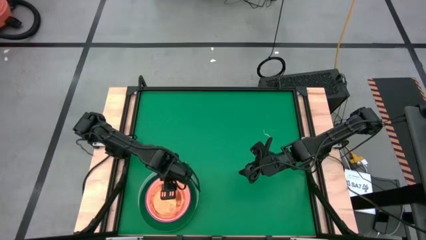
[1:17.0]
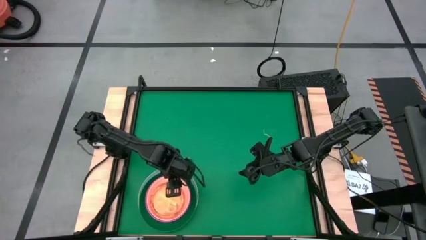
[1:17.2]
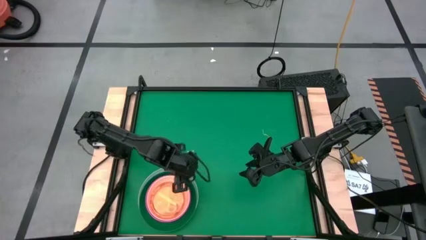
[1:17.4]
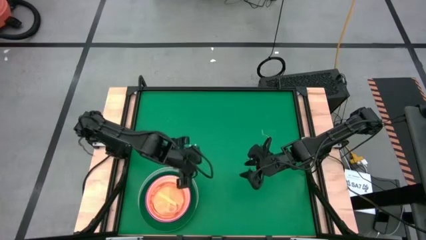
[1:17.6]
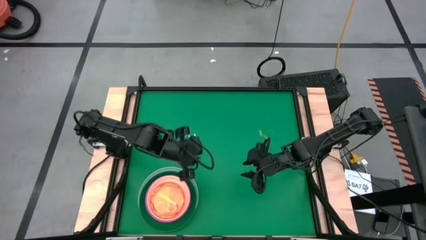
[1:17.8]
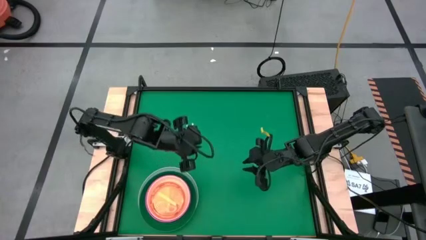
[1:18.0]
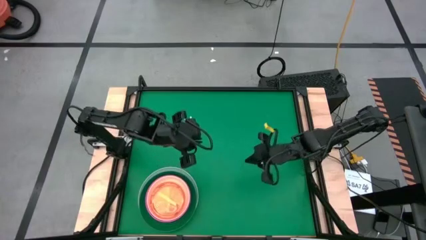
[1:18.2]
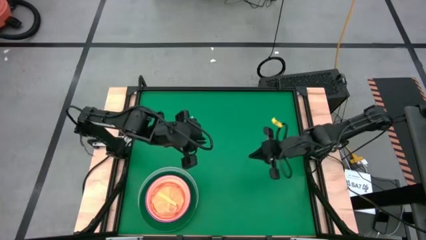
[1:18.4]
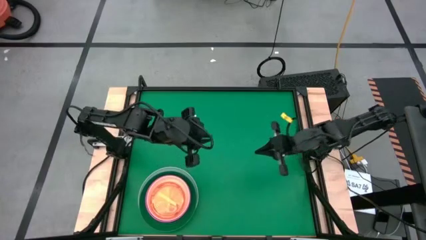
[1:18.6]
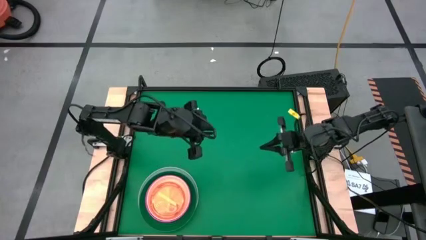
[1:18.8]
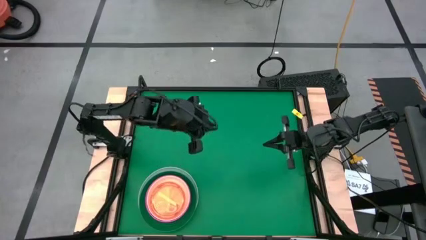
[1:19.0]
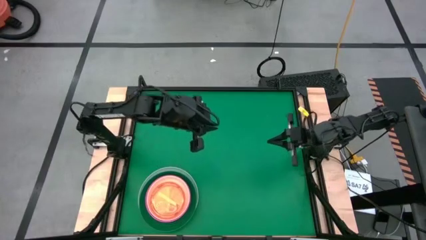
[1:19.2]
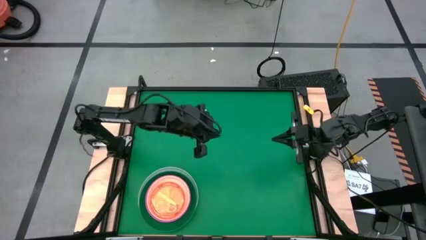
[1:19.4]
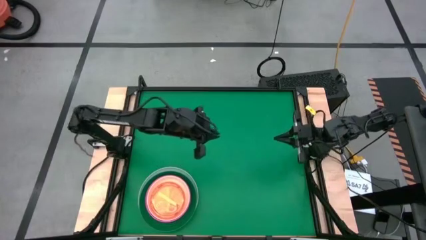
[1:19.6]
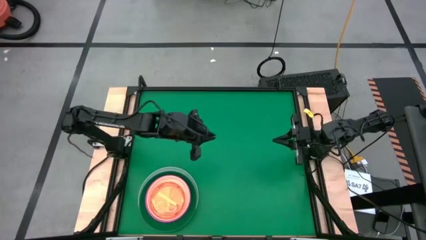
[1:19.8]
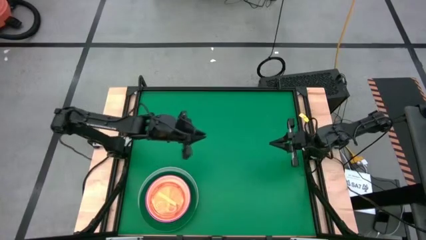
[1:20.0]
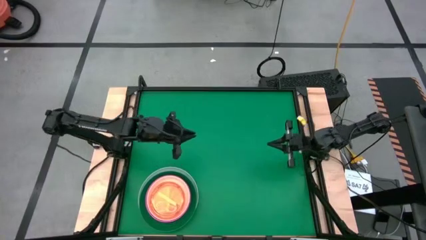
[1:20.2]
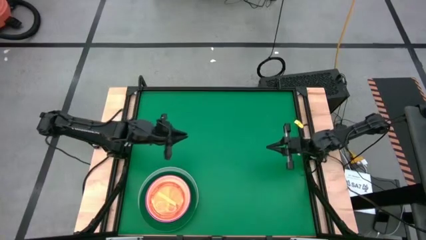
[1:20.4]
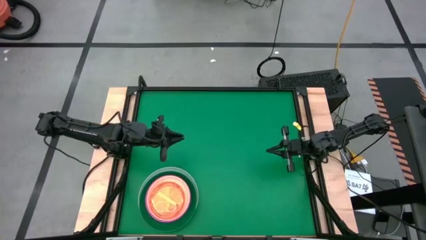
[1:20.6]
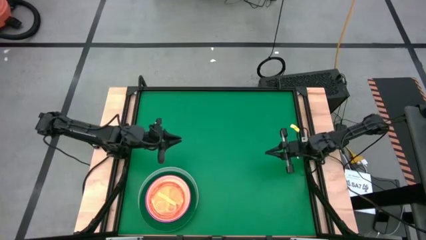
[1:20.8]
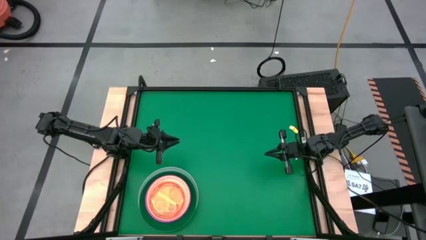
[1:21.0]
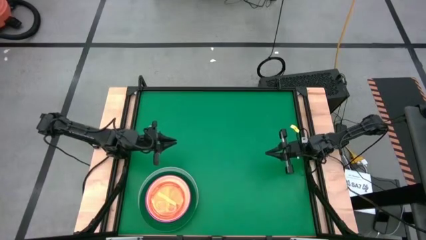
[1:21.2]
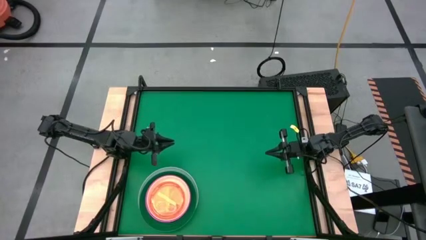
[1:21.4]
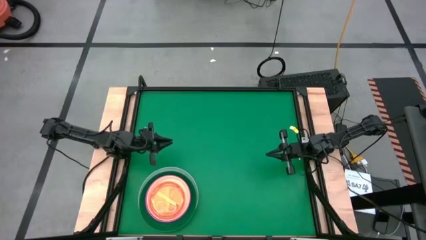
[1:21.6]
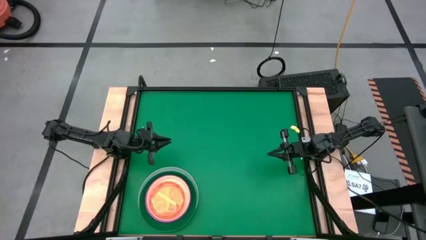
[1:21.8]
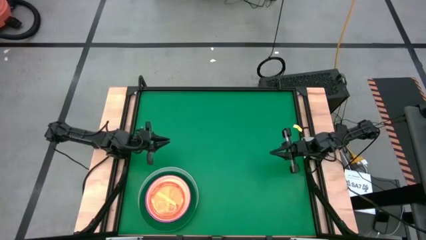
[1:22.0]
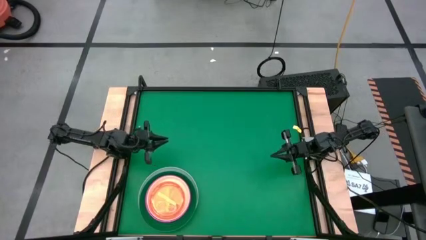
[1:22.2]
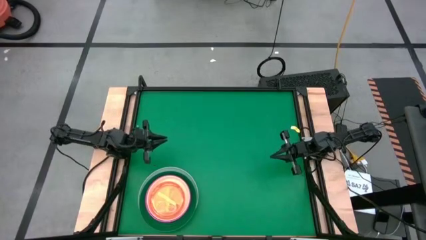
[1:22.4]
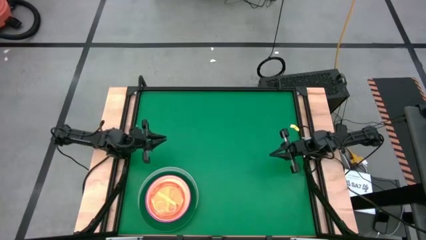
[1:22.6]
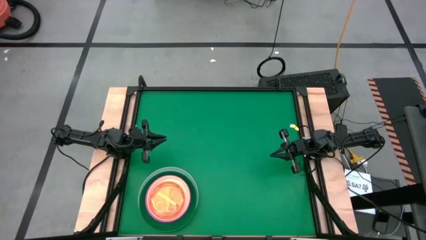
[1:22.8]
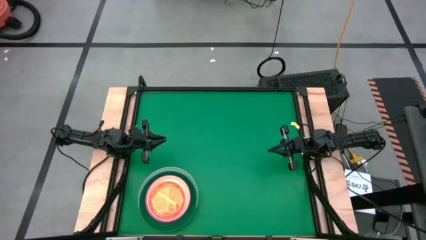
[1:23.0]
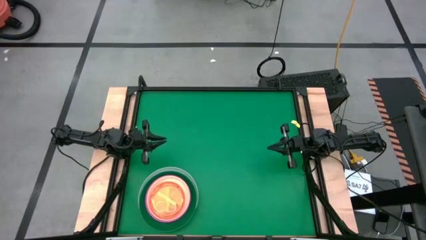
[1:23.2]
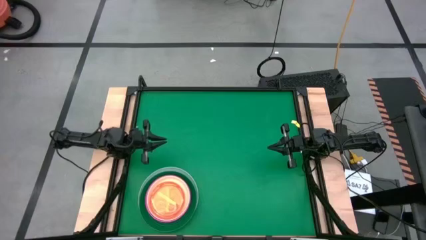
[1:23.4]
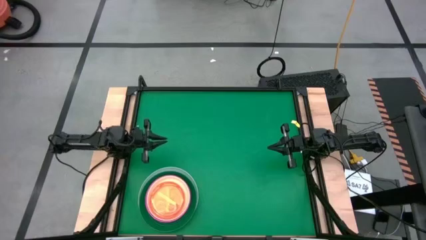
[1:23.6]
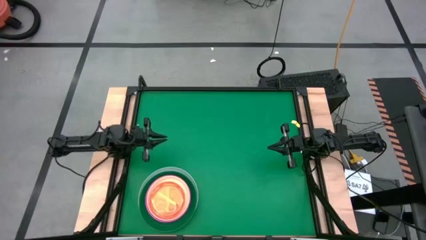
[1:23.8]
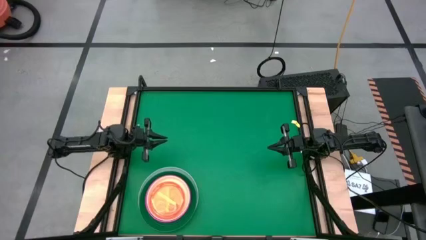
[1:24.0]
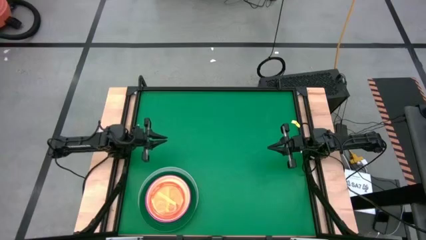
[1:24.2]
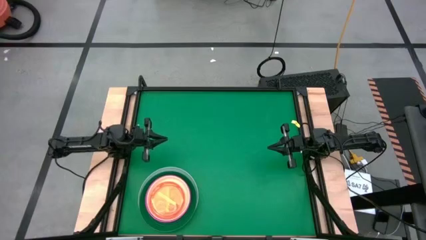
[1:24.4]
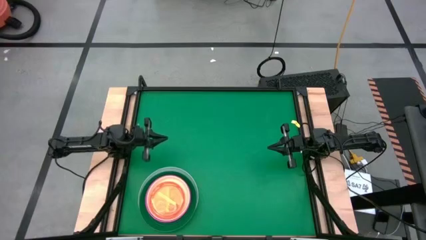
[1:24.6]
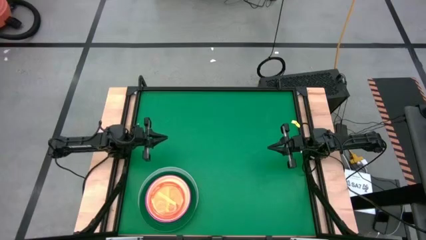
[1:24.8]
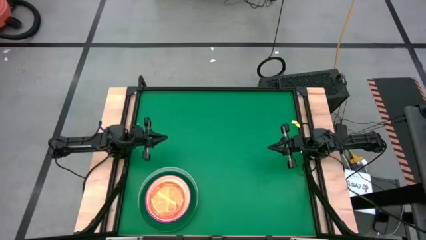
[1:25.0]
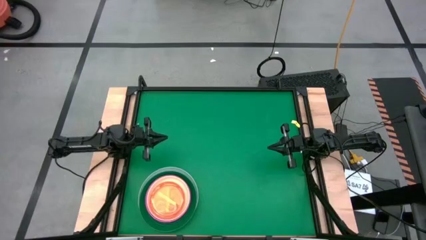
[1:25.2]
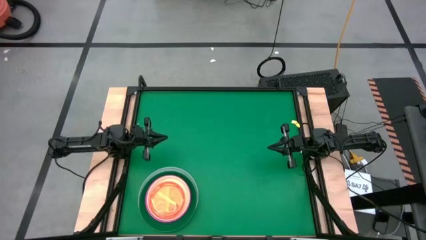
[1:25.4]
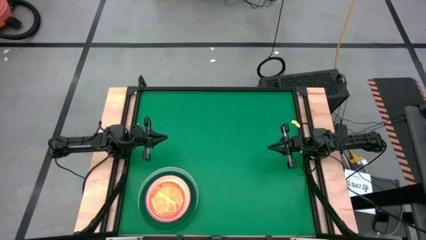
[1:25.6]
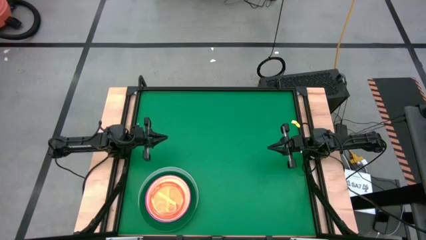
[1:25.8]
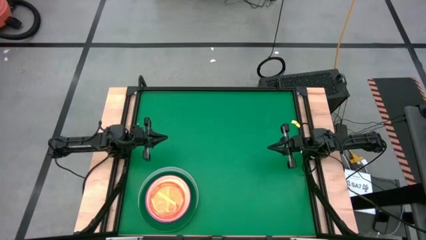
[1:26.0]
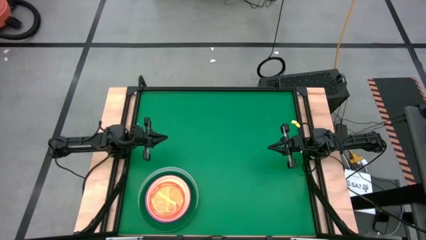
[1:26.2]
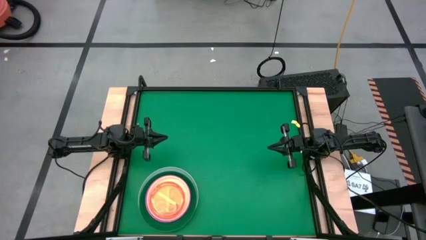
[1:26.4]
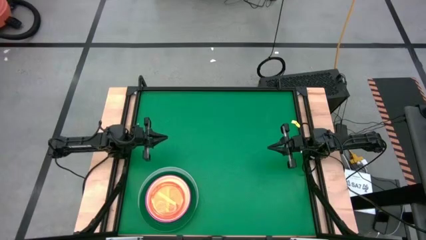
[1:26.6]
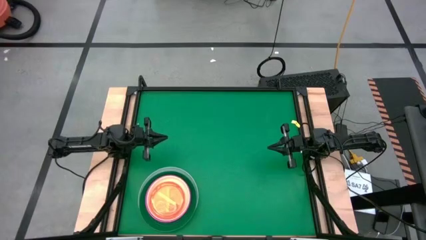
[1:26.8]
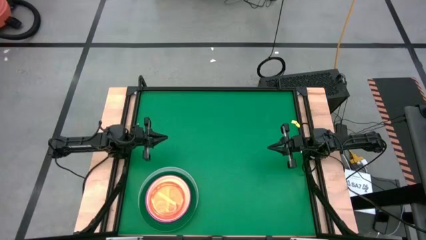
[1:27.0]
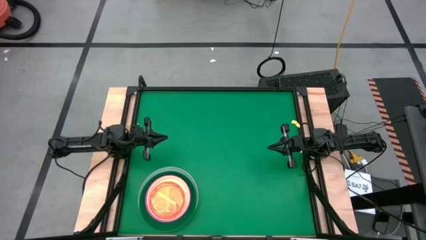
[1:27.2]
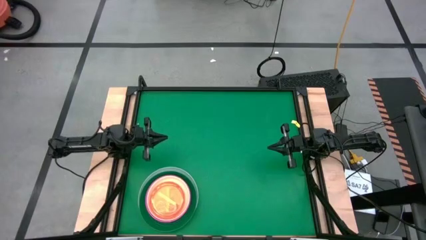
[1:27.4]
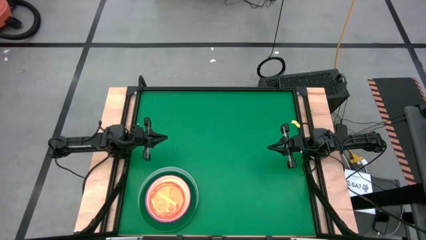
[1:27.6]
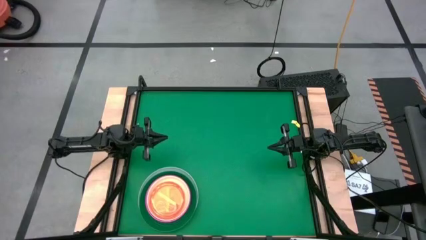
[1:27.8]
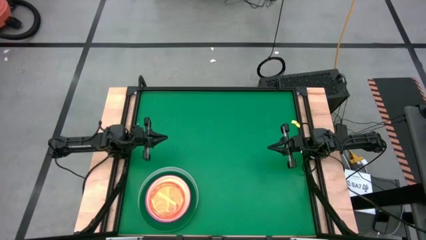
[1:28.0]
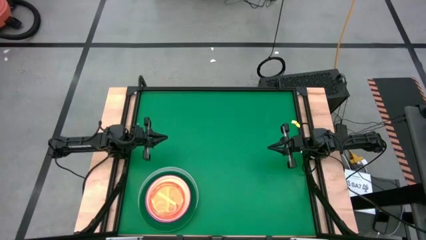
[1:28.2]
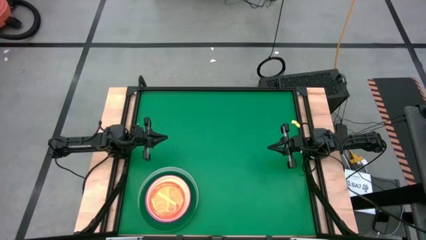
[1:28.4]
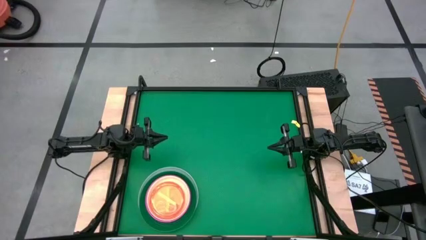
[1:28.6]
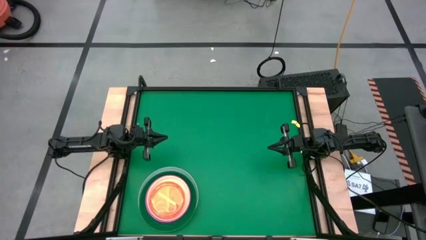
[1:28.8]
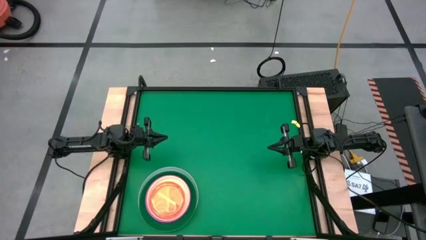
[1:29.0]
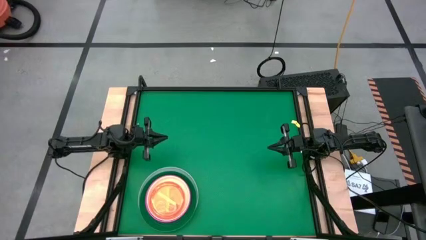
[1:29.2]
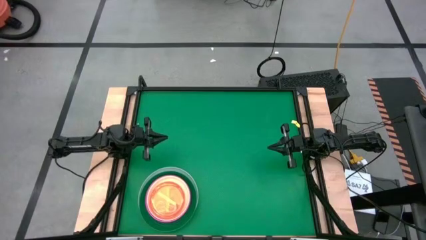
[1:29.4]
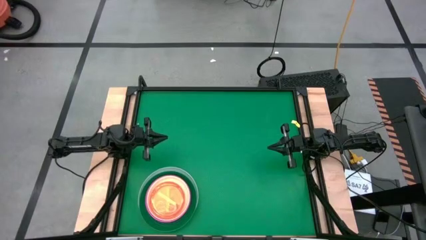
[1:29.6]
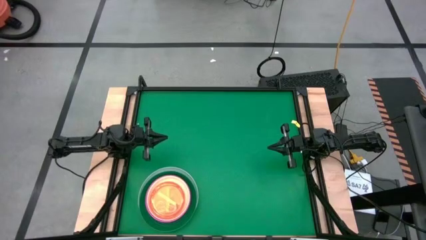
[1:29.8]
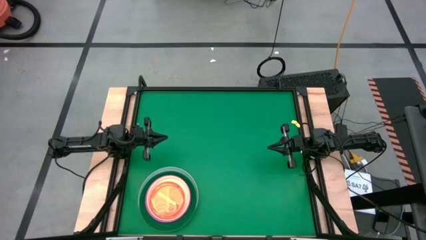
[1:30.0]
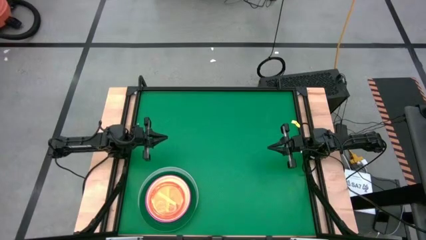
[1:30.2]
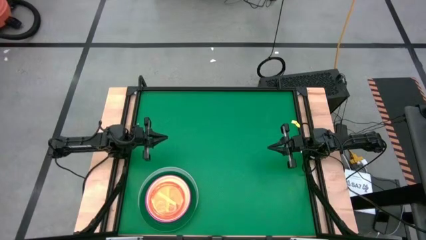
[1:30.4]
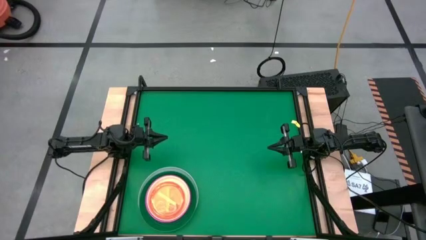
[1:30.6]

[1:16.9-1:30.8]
Task: Stack plastic plates
Return to Home Position
